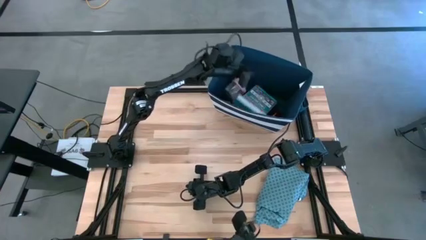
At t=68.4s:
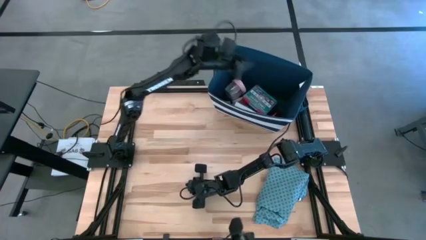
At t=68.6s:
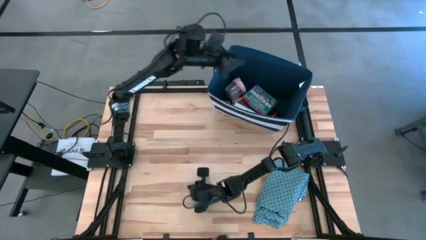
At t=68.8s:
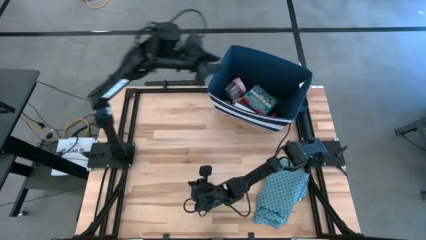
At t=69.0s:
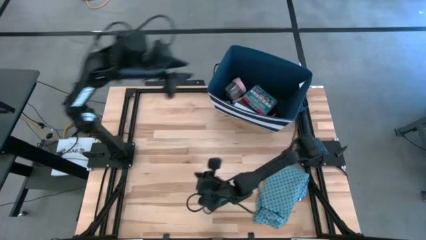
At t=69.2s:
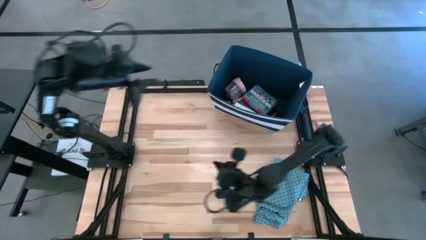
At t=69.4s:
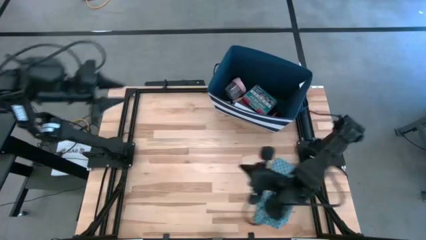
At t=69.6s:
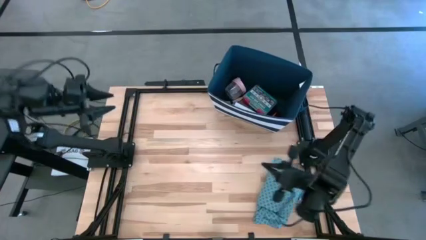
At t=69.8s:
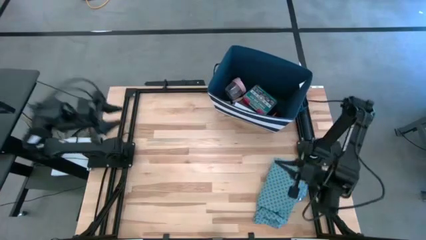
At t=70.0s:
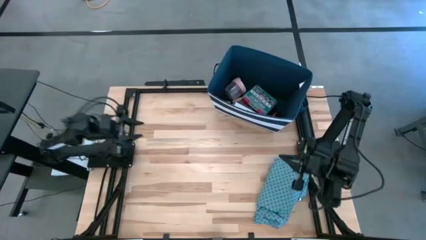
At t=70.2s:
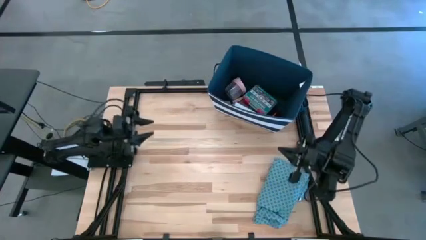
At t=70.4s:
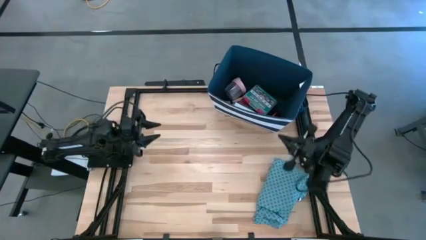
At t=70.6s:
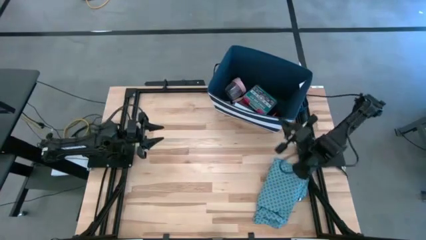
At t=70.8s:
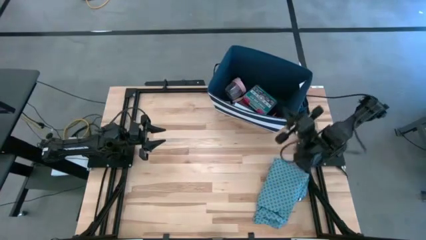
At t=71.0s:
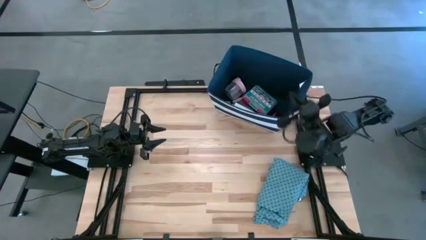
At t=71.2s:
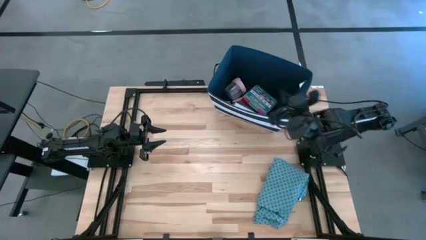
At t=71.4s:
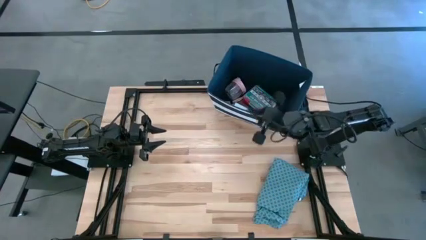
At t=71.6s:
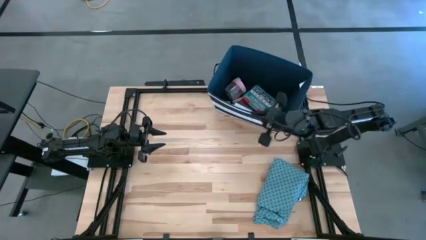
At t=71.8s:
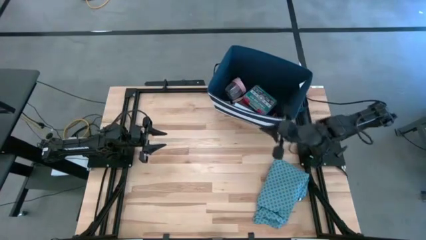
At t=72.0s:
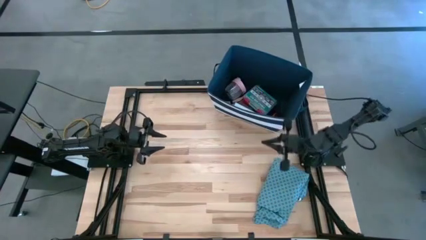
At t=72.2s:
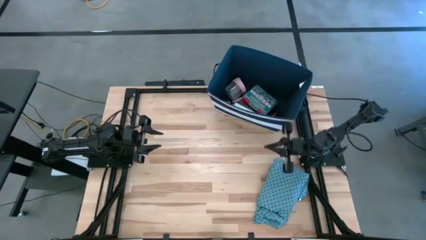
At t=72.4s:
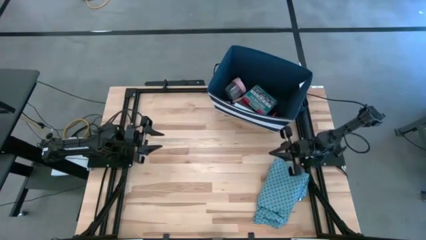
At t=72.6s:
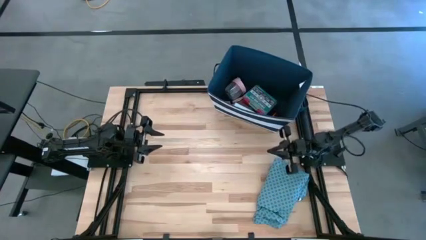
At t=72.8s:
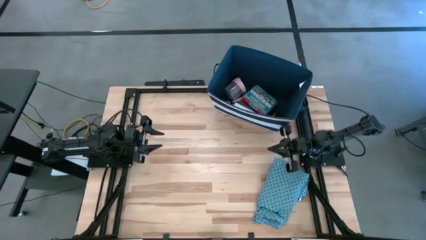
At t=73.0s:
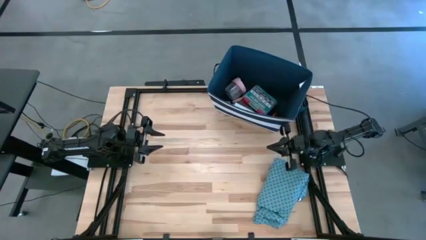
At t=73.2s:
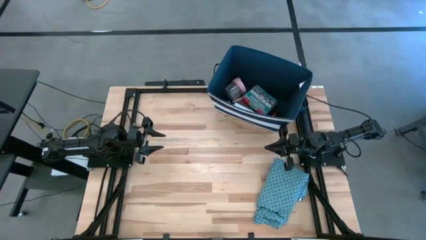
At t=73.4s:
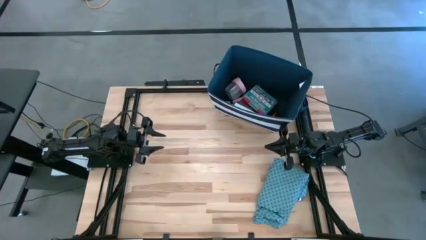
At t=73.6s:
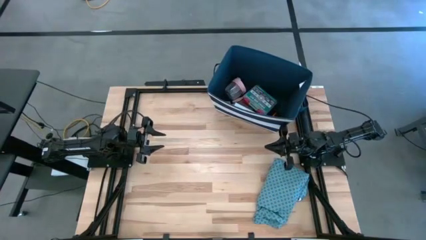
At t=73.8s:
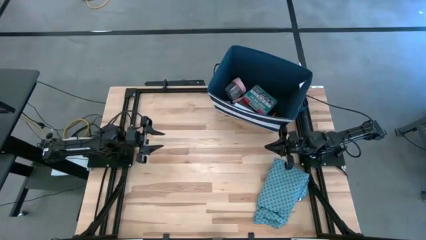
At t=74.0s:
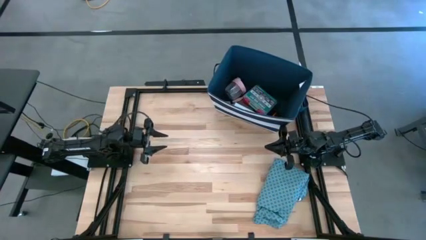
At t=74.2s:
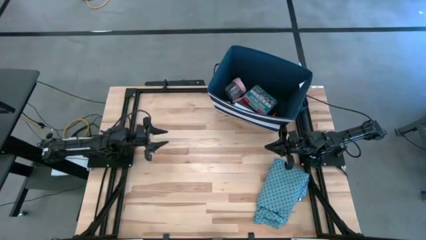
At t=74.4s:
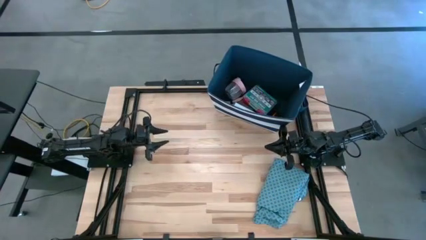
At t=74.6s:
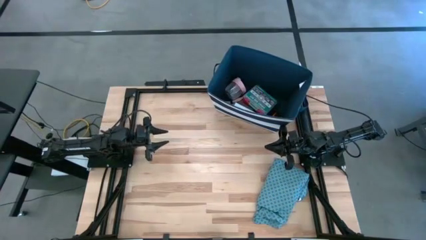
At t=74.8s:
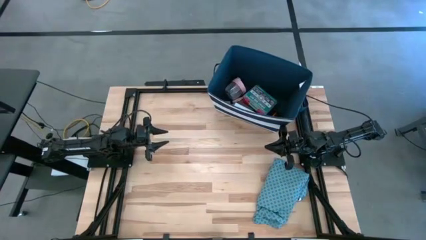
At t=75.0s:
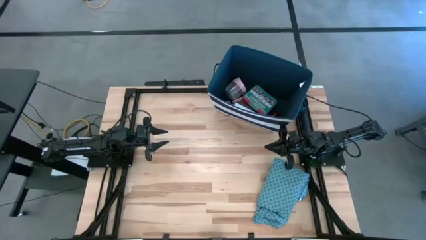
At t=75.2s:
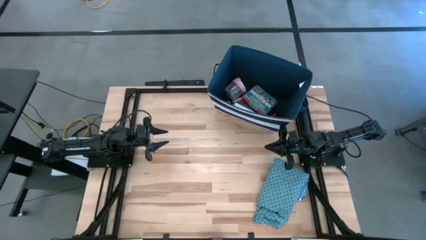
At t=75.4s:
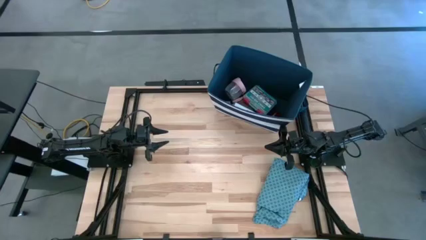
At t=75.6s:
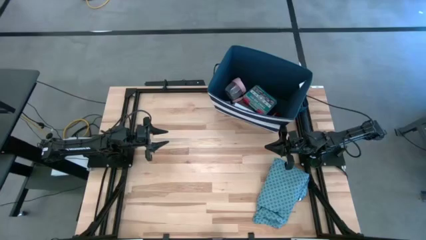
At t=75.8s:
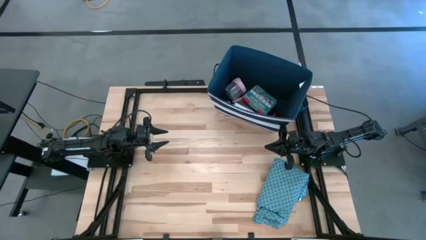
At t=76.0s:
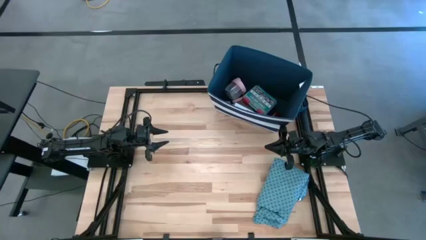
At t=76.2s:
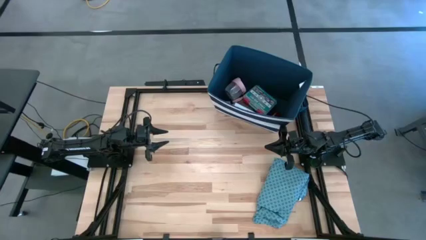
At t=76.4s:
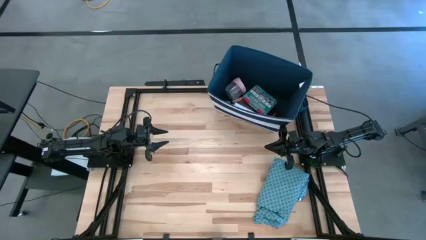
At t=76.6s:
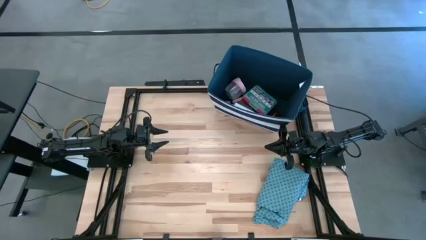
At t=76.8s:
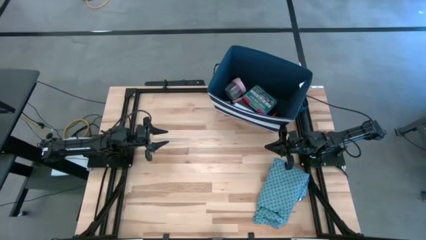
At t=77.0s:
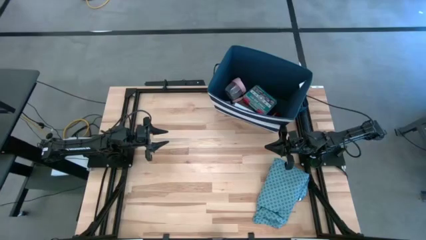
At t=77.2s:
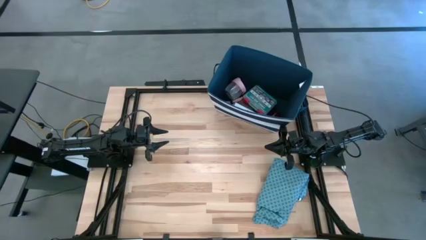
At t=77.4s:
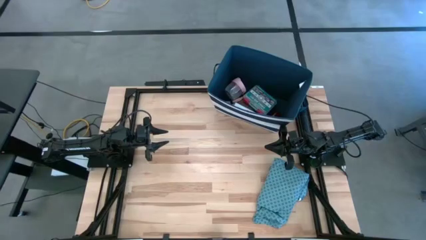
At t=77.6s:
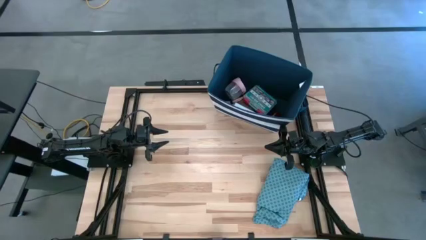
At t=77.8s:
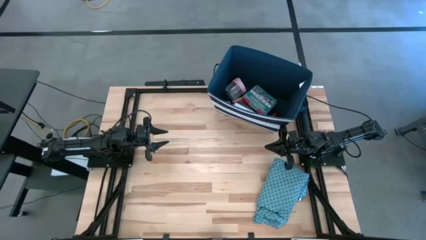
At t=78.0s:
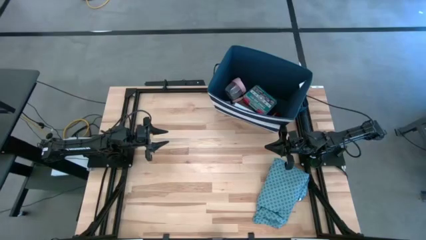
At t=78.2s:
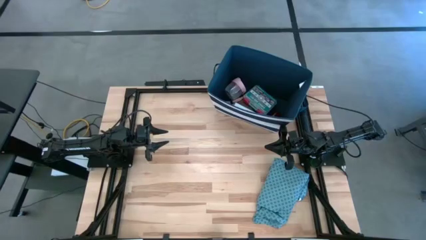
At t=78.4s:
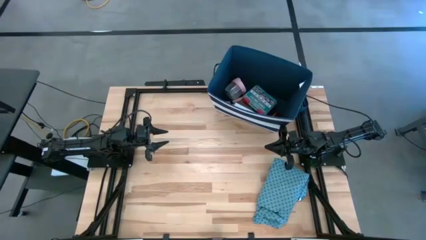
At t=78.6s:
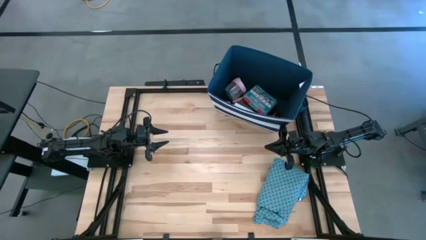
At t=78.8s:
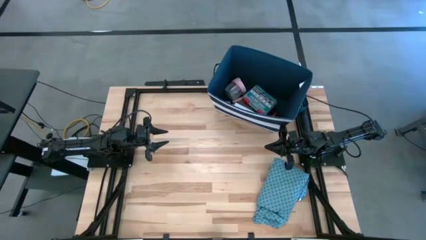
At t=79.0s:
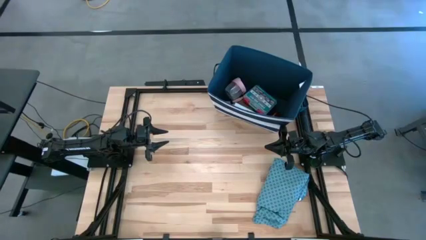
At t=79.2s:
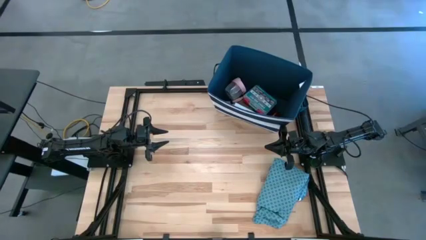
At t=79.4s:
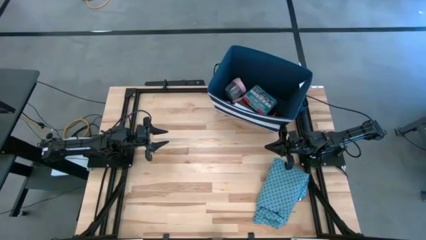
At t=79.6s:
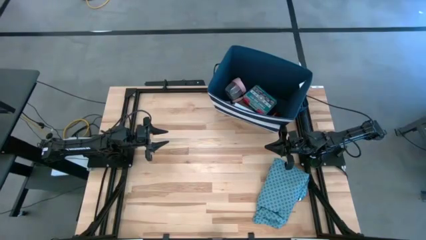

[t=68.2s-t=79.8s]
Task: Pick & place medical supplies in basket/bin
Return to Home Position
